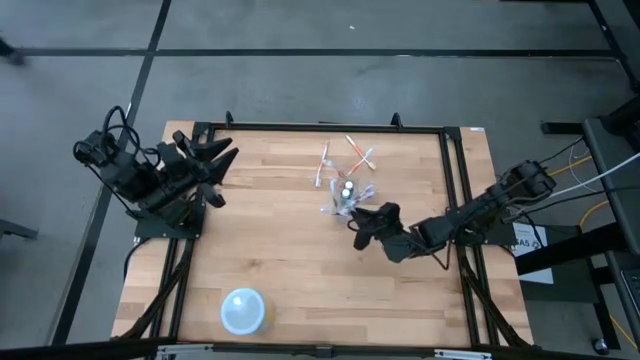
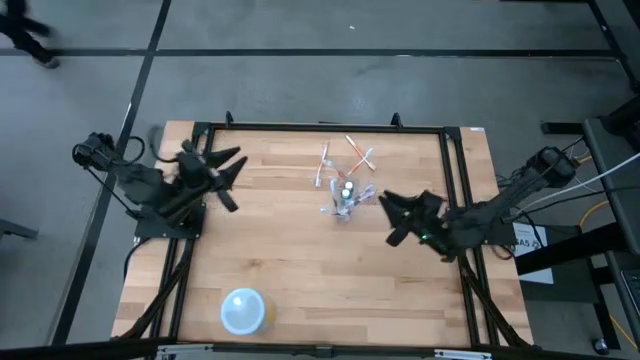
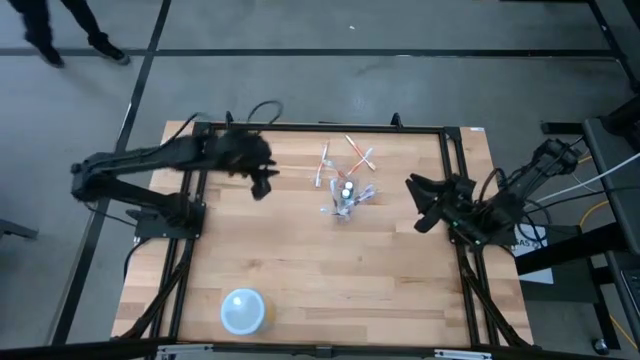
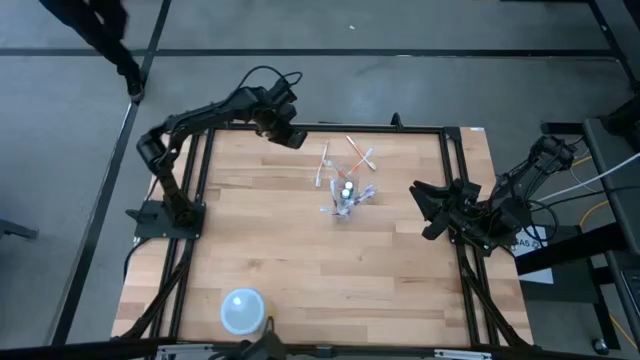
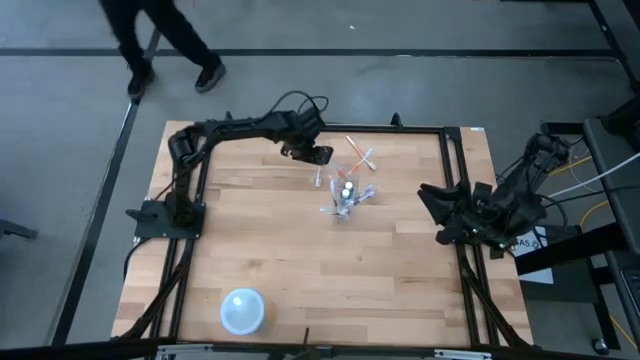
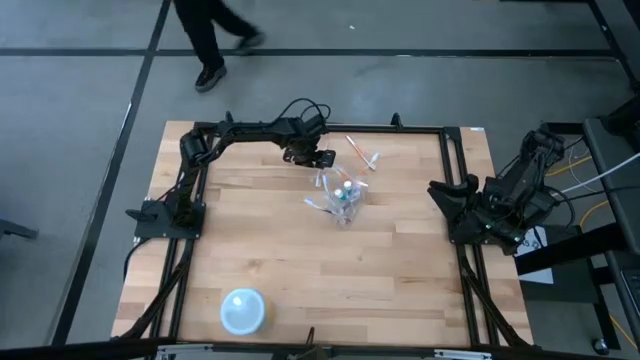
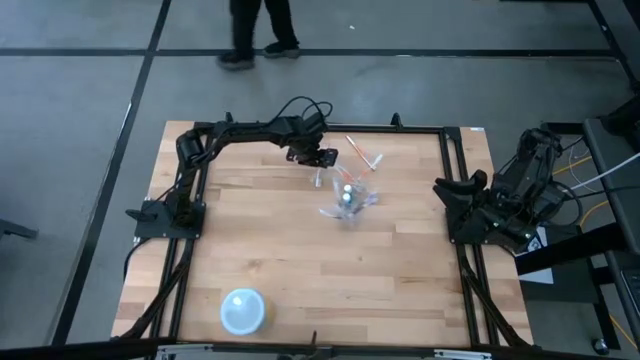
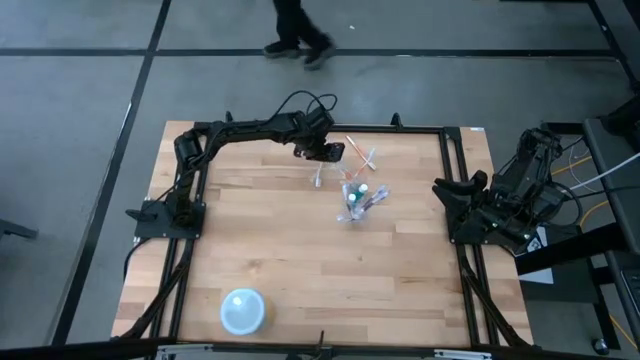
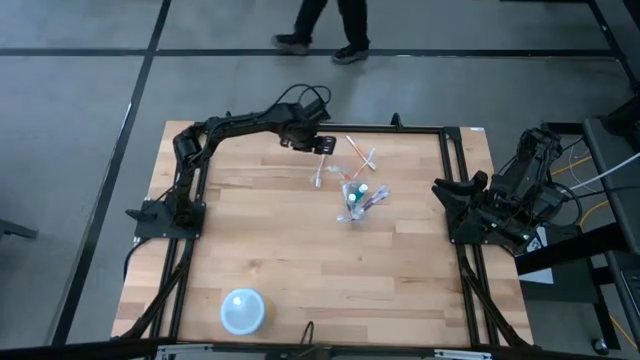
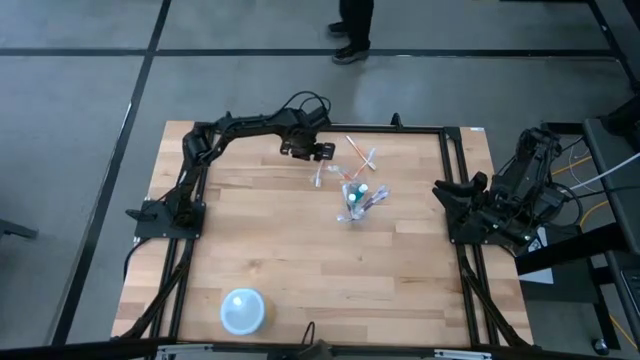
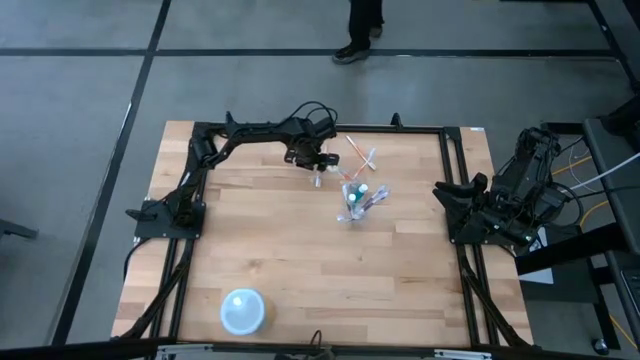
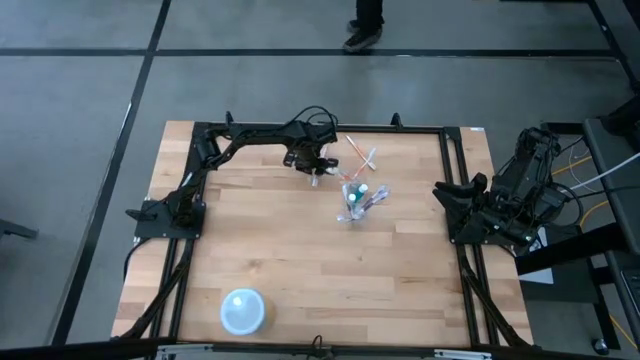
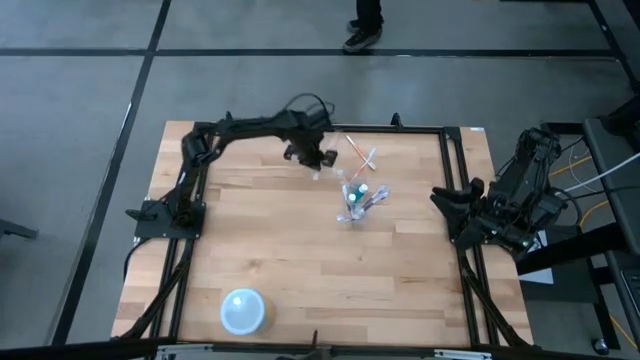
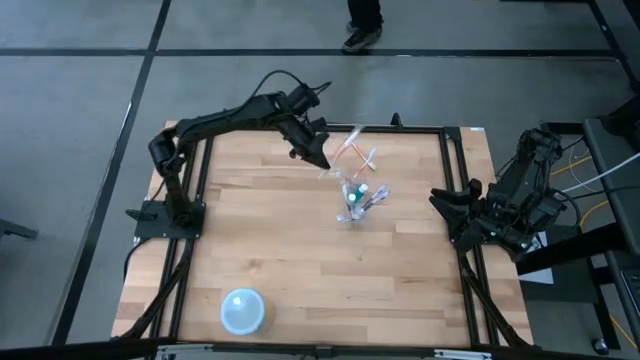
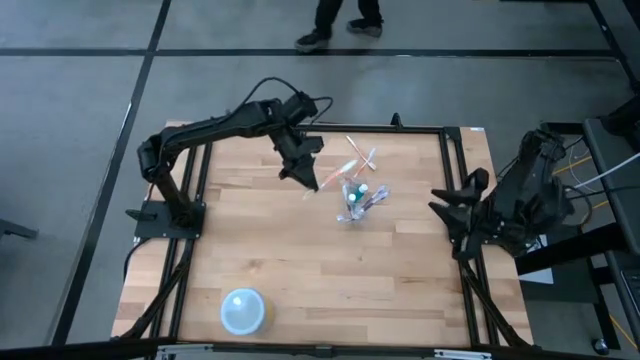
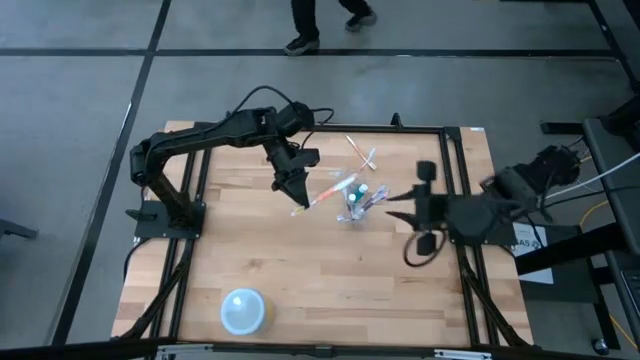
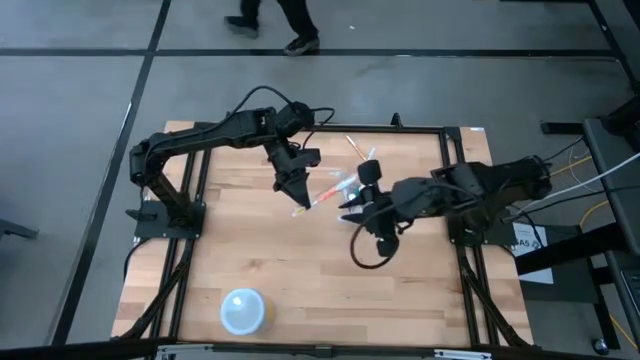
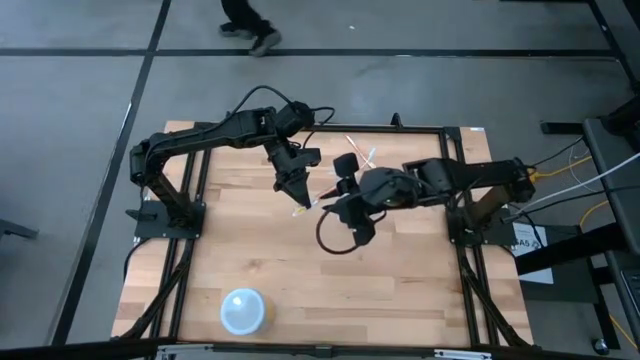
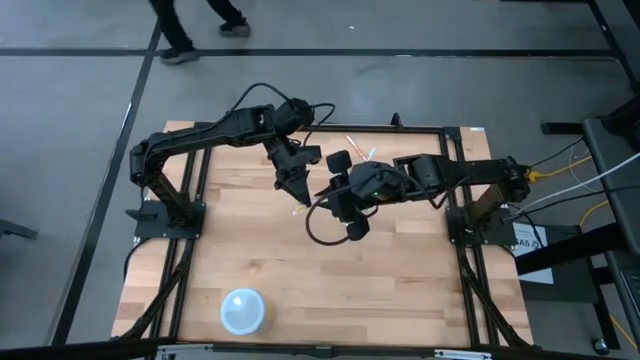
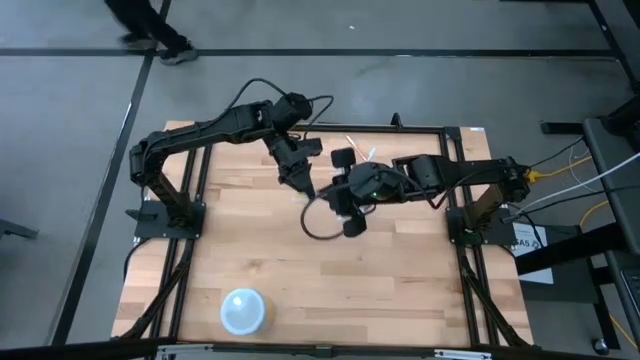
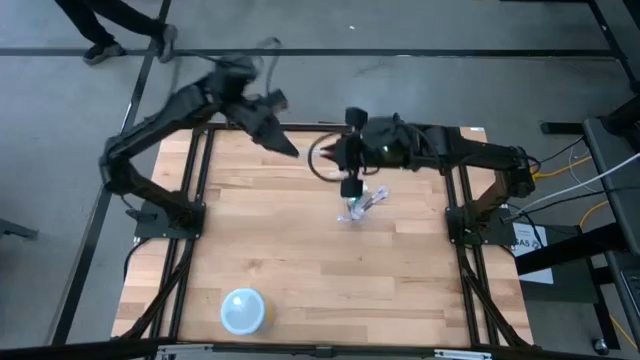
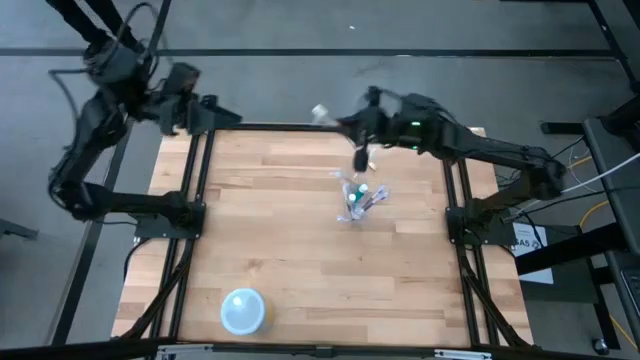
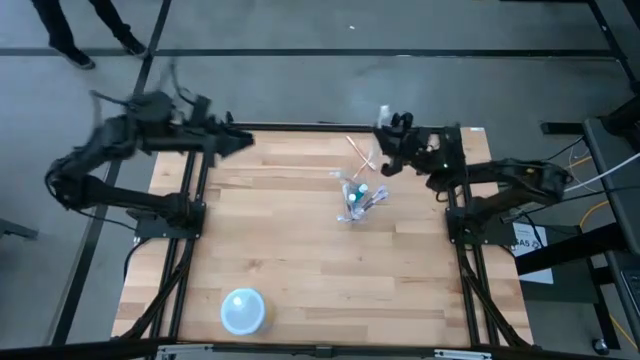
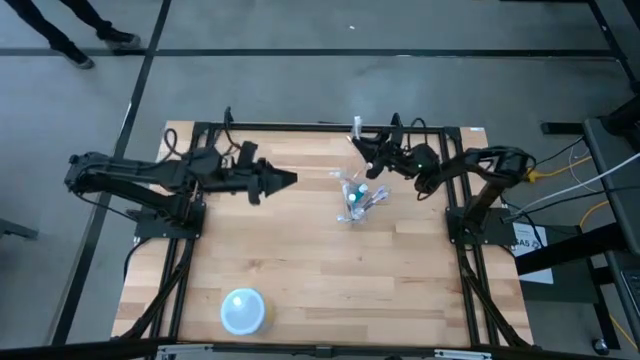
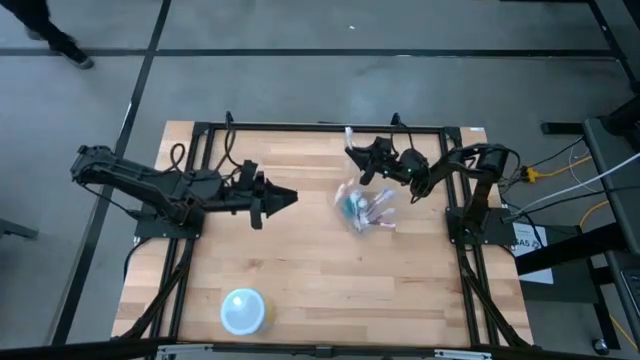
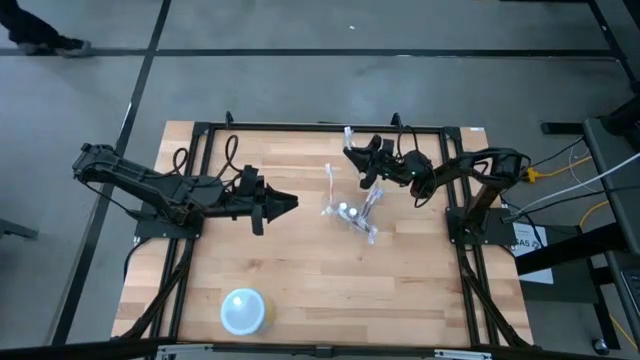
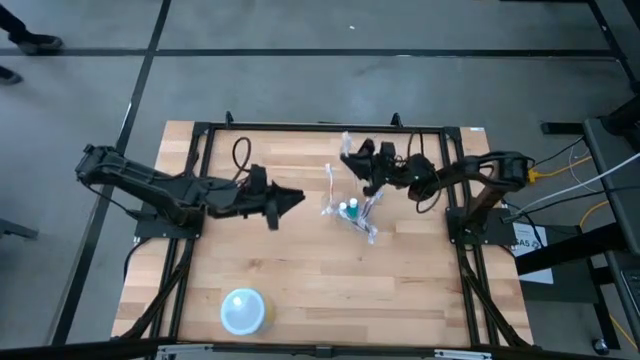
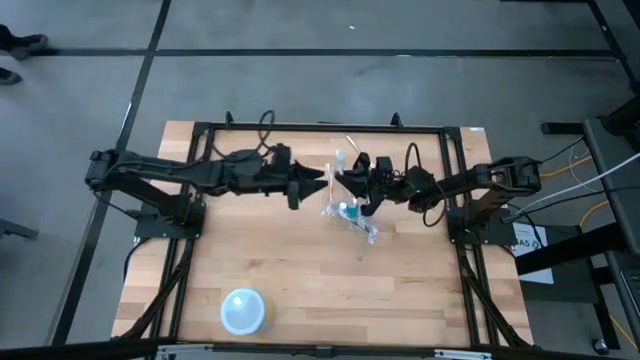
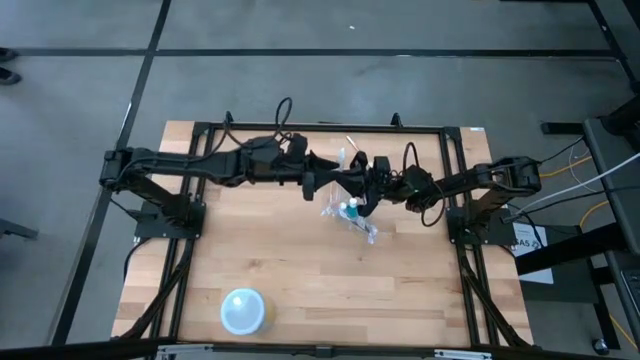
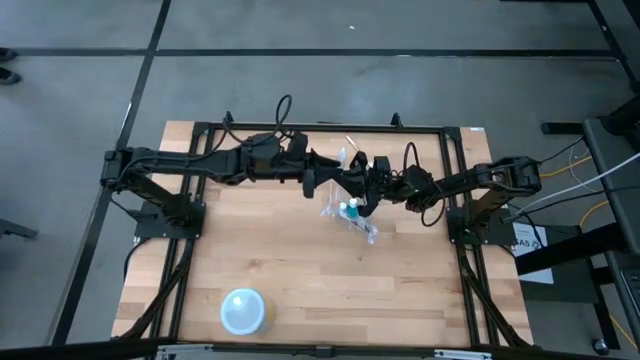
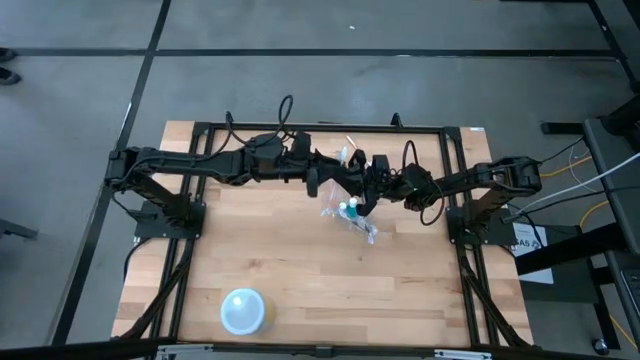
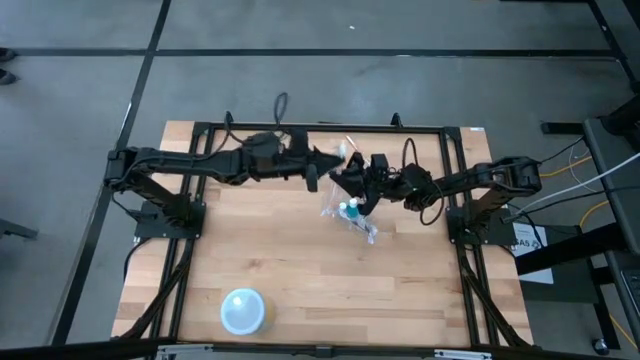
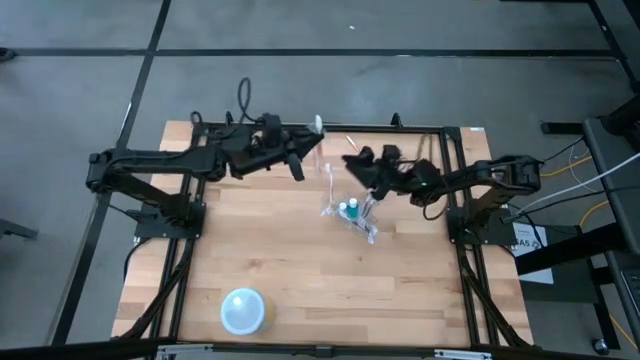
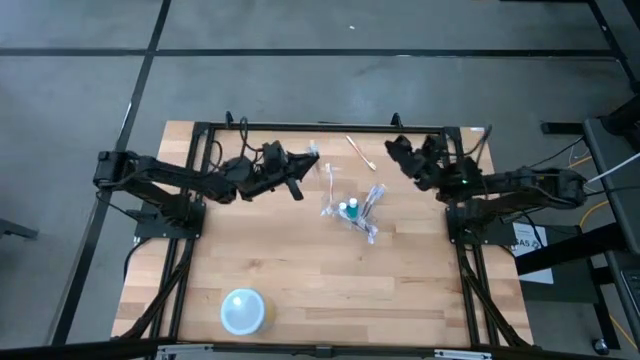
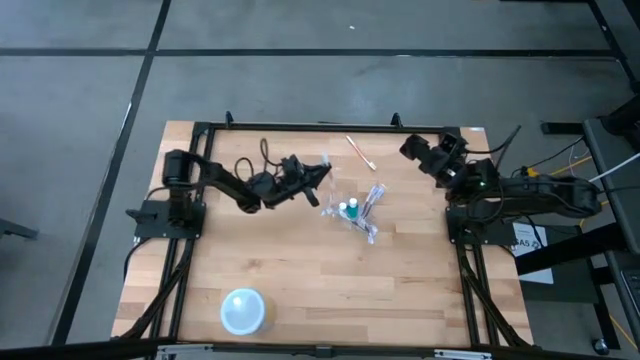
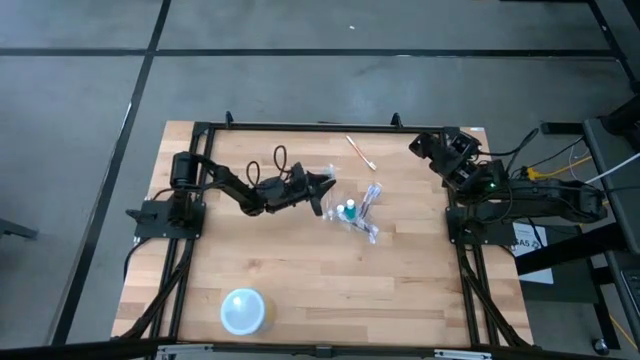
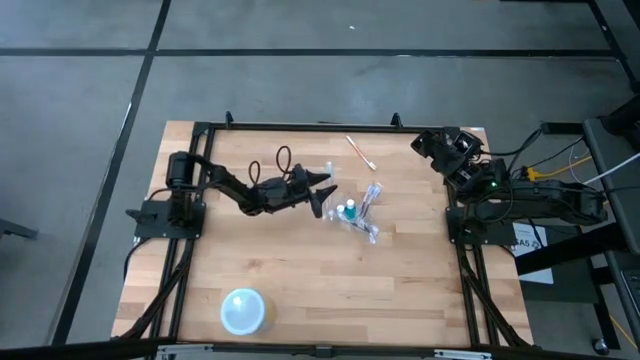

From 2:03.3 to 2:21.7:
Task: Pick & Place toothbrushing station
Put the orange toothbrush into the transparent organizer

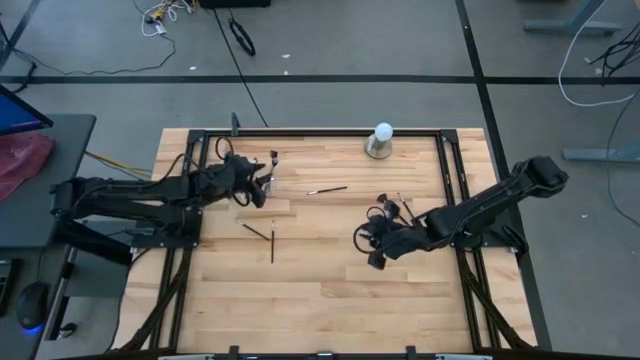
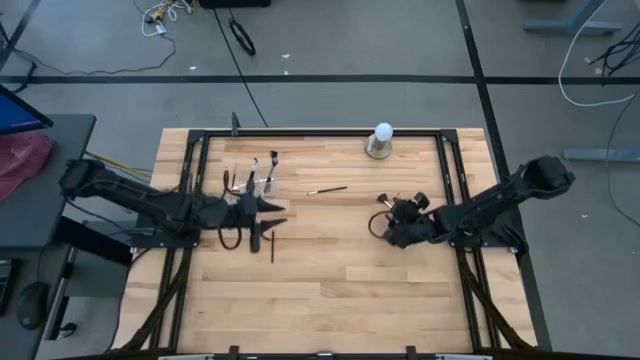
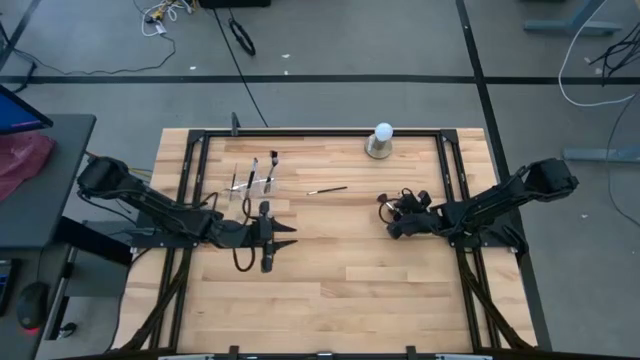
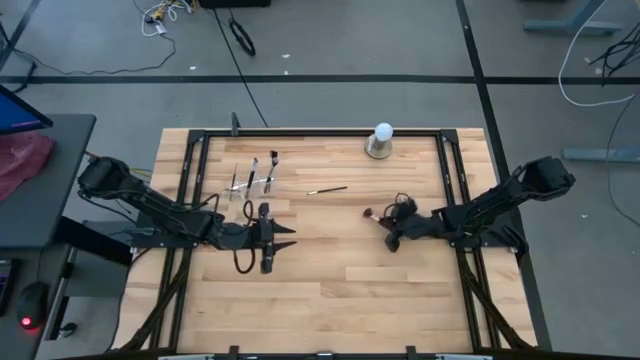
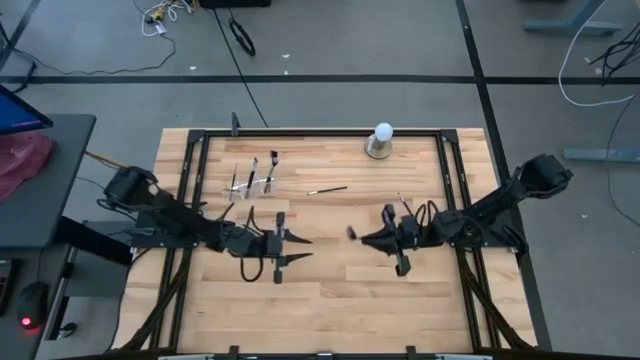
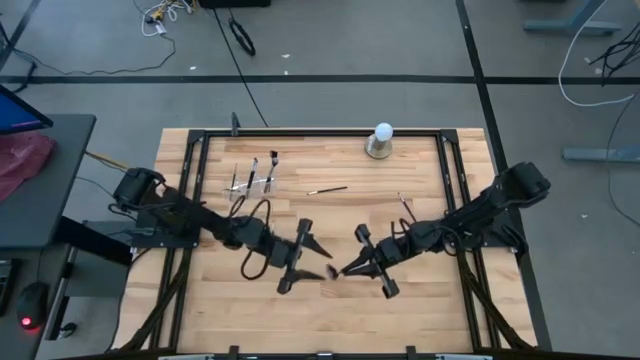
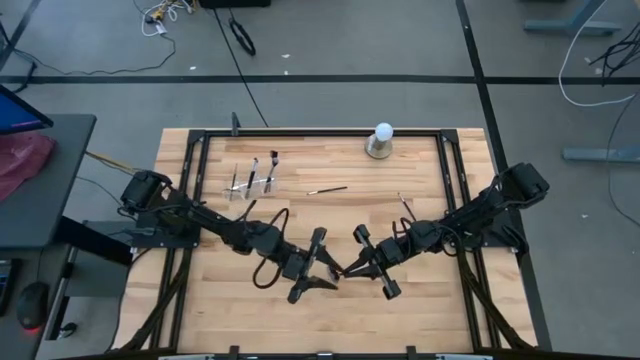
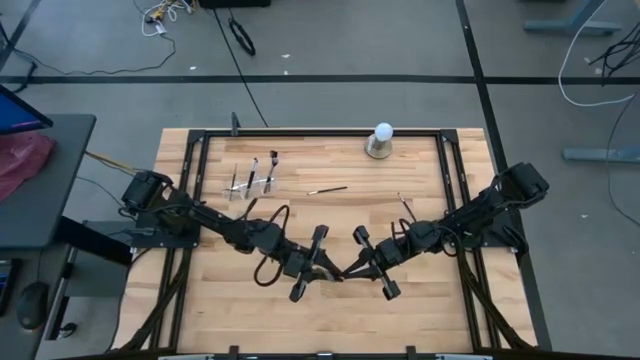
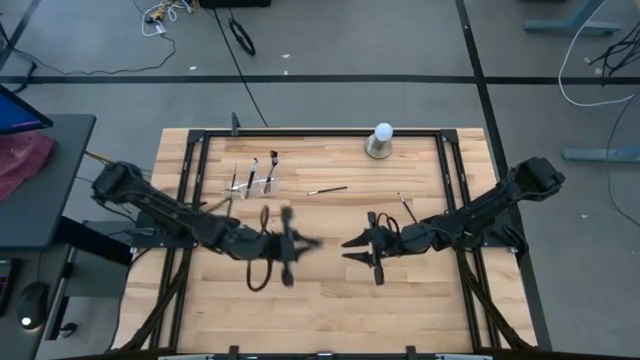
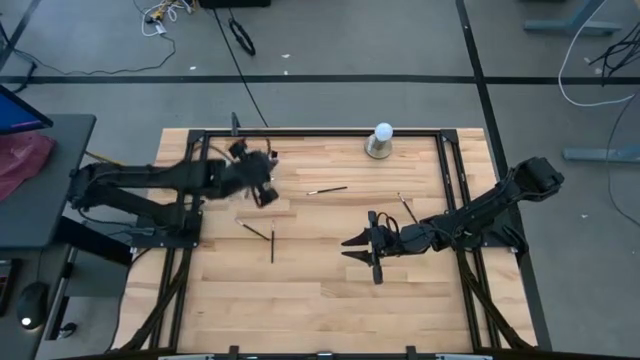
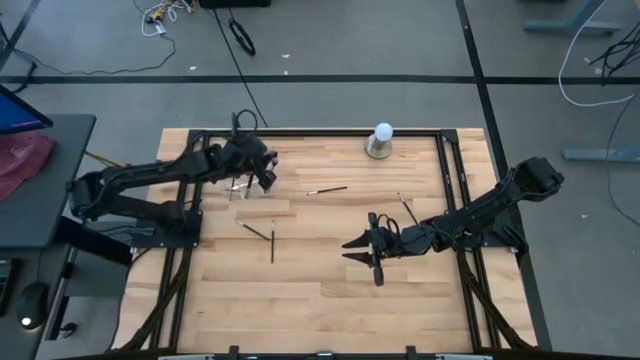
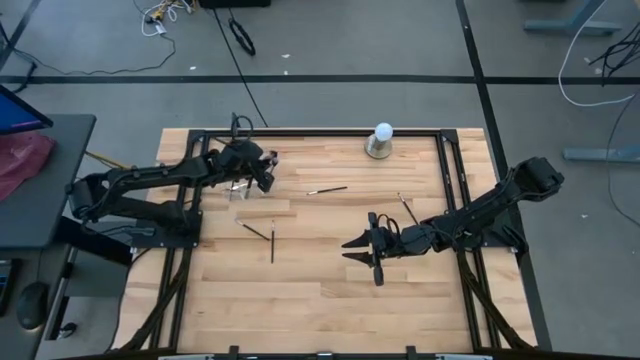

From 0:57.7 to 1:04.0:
Task: Put items in baskets/containers
Put the black highlighter brush into the right section of the transparent organizer
